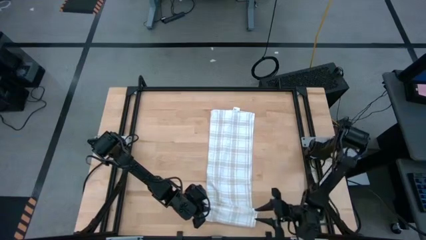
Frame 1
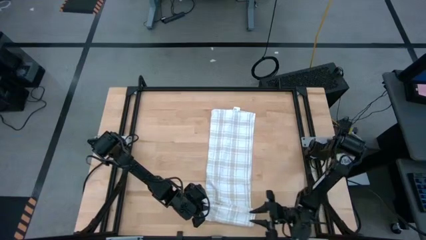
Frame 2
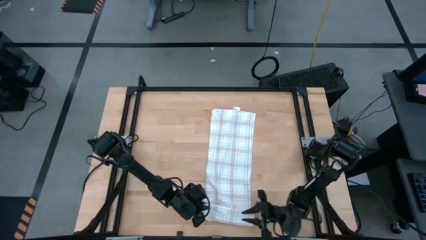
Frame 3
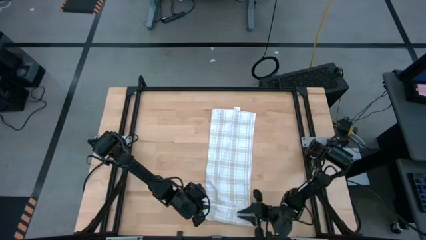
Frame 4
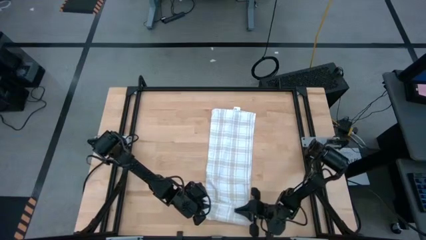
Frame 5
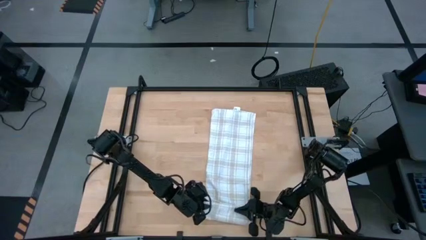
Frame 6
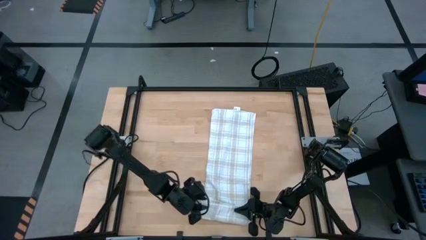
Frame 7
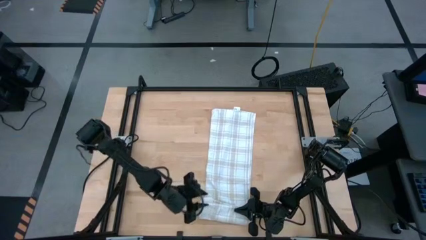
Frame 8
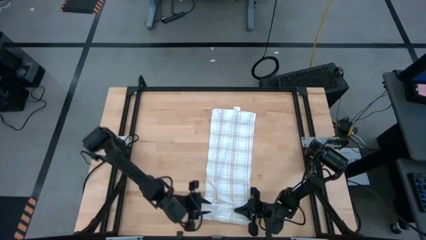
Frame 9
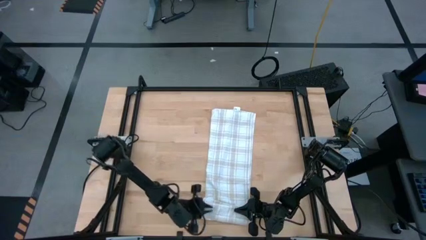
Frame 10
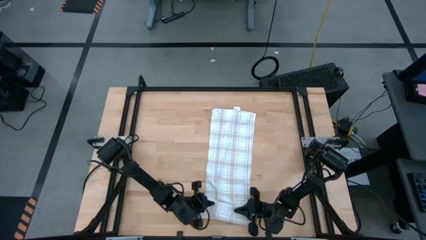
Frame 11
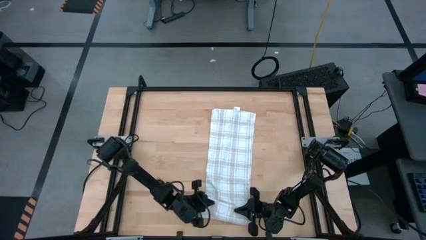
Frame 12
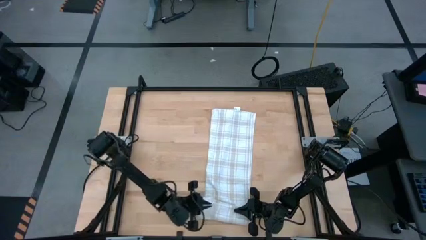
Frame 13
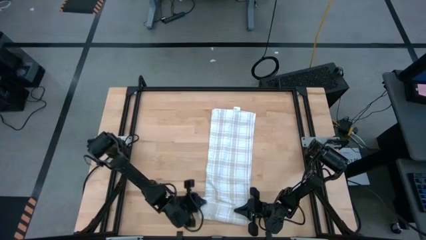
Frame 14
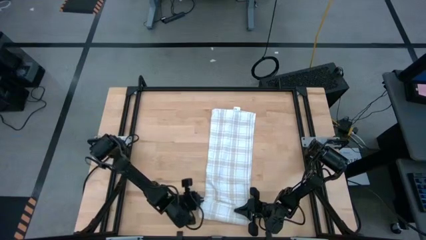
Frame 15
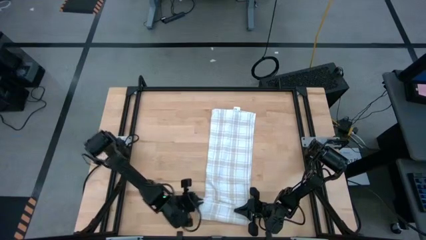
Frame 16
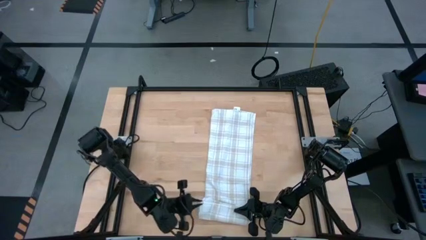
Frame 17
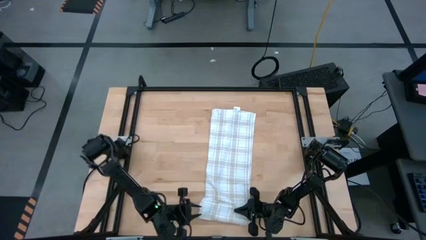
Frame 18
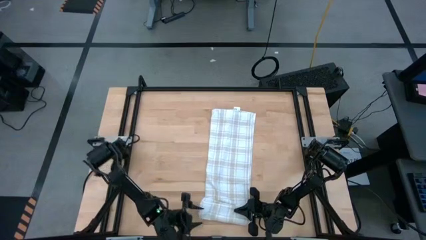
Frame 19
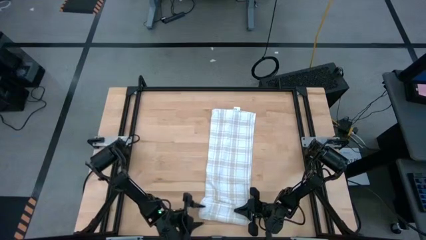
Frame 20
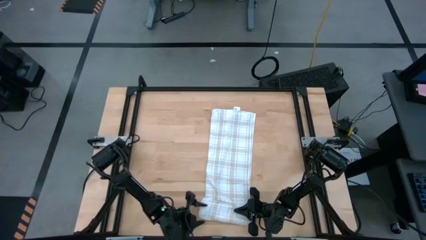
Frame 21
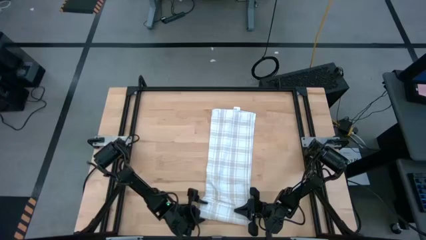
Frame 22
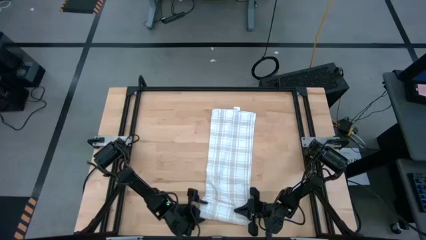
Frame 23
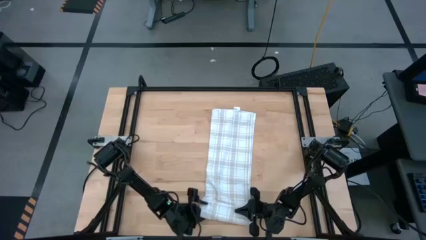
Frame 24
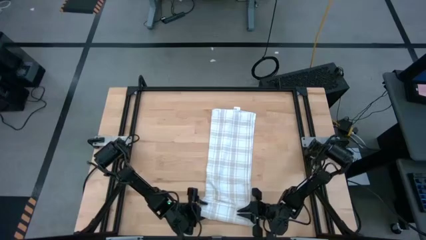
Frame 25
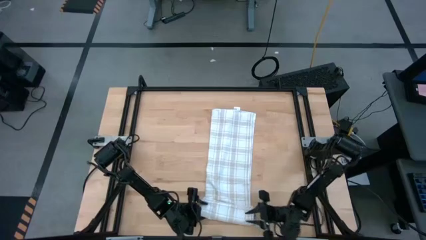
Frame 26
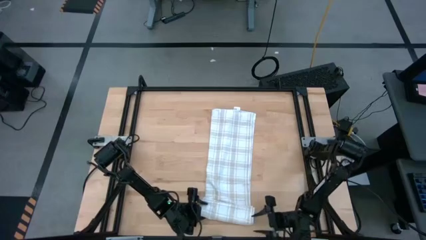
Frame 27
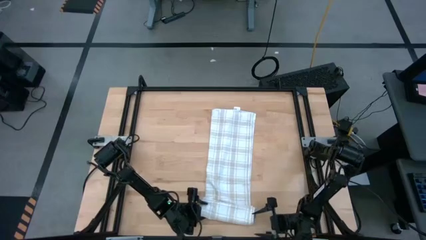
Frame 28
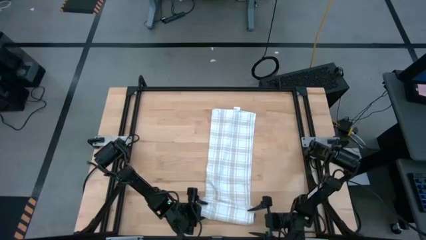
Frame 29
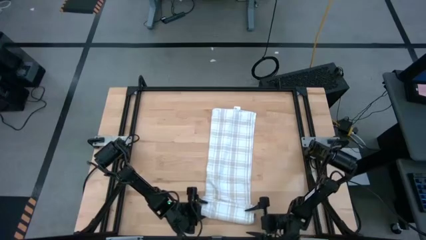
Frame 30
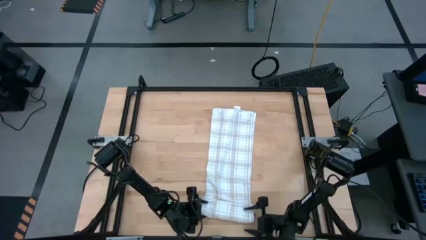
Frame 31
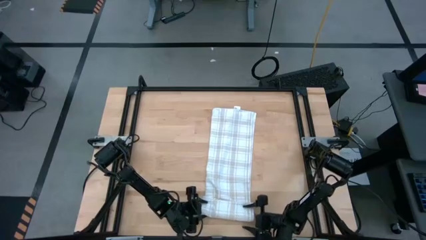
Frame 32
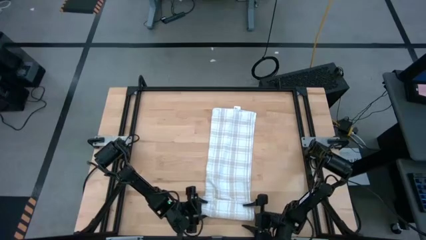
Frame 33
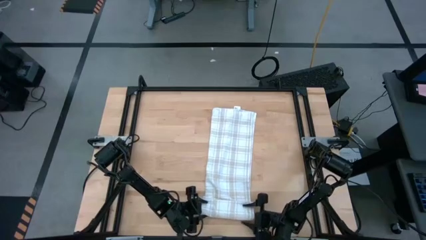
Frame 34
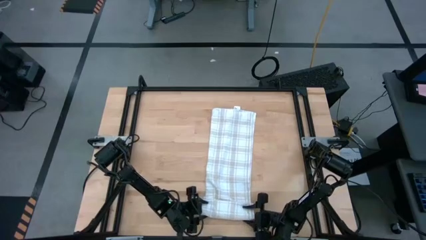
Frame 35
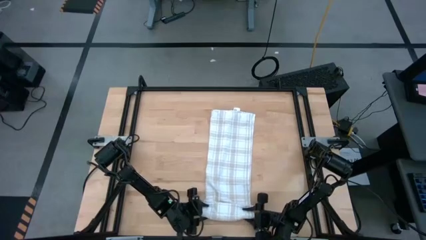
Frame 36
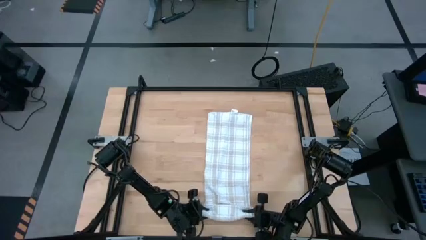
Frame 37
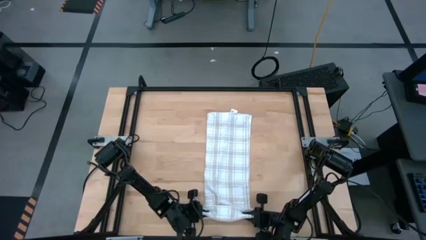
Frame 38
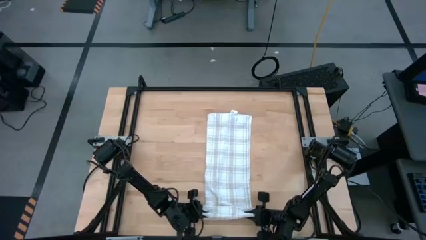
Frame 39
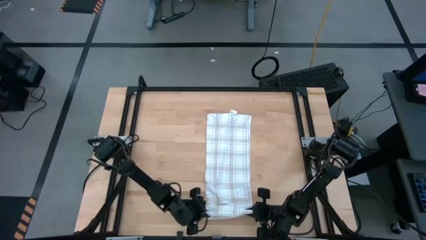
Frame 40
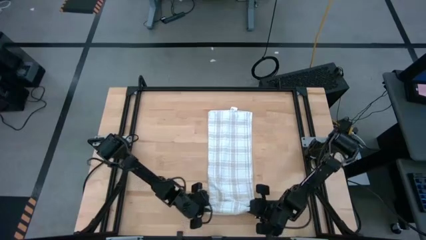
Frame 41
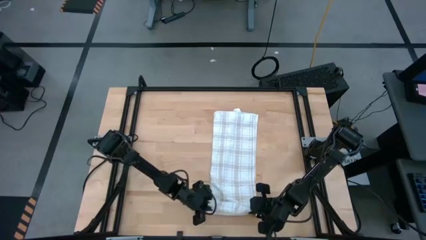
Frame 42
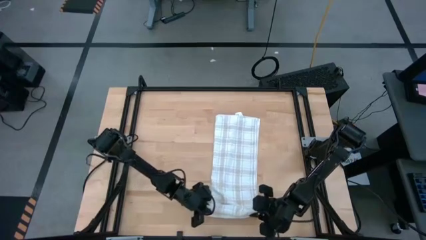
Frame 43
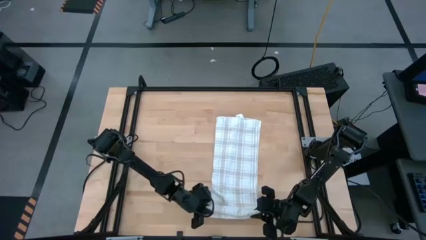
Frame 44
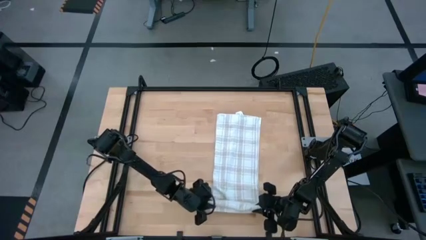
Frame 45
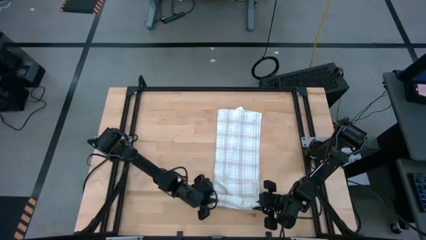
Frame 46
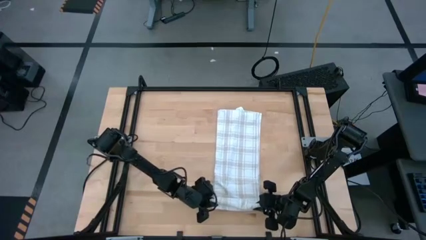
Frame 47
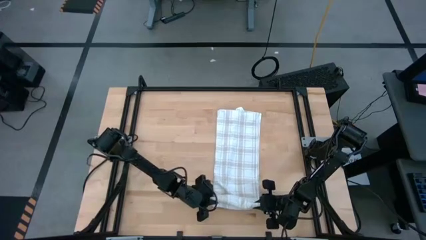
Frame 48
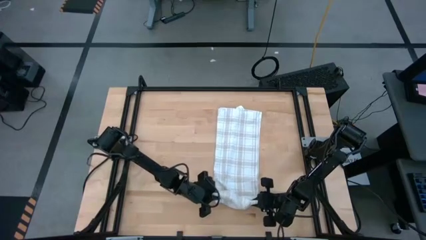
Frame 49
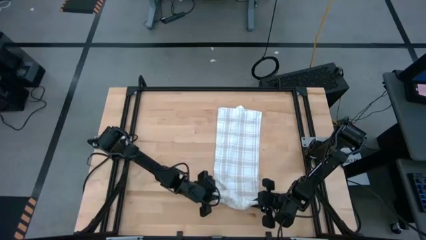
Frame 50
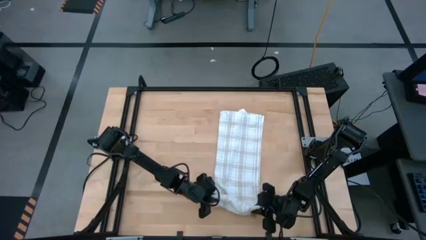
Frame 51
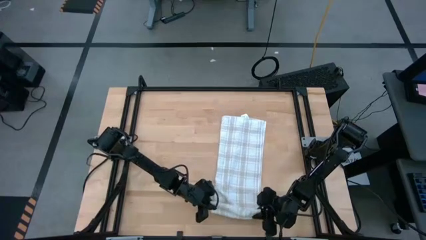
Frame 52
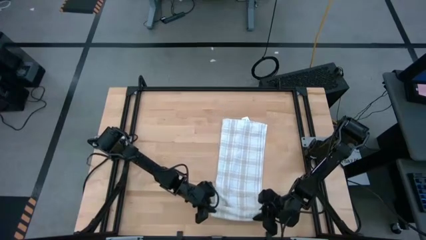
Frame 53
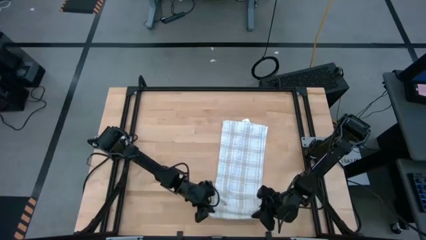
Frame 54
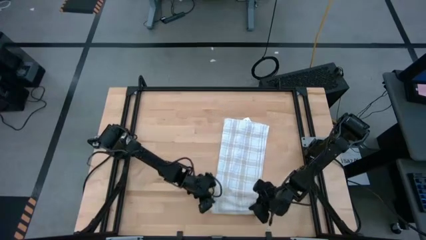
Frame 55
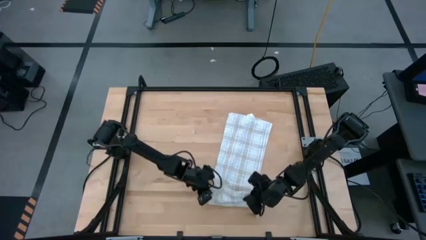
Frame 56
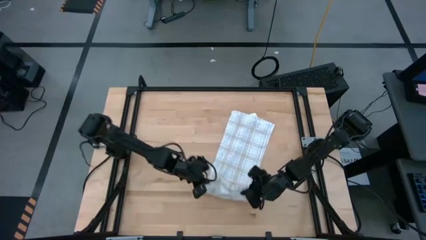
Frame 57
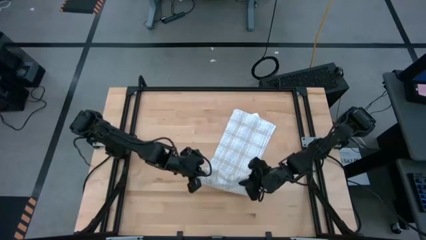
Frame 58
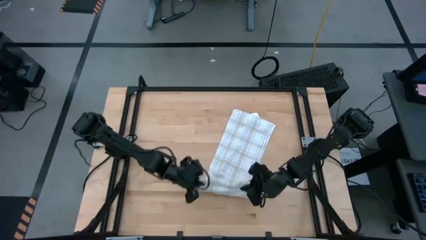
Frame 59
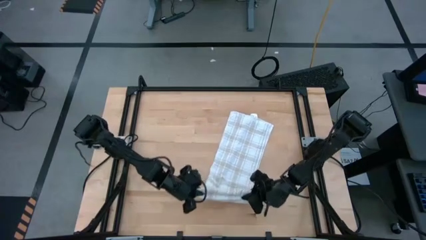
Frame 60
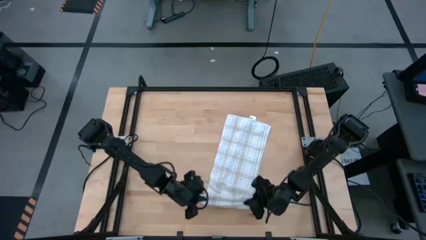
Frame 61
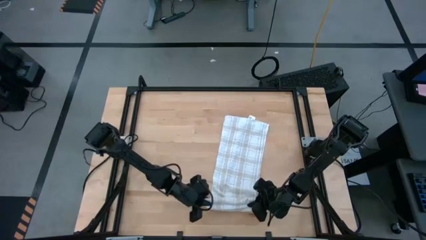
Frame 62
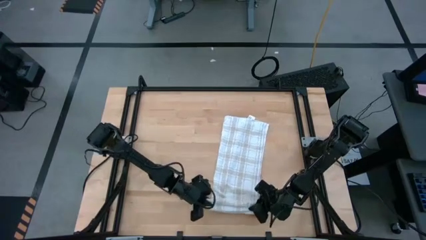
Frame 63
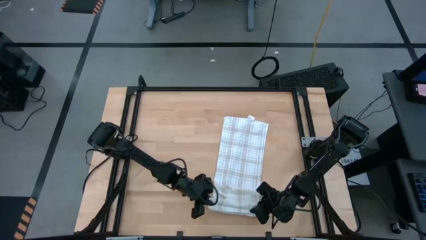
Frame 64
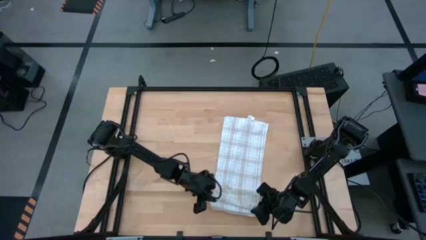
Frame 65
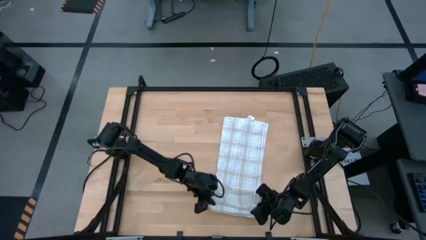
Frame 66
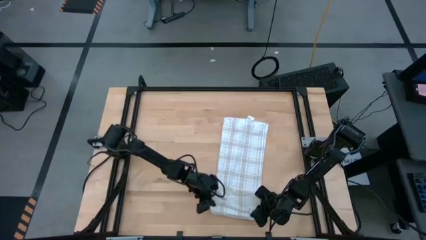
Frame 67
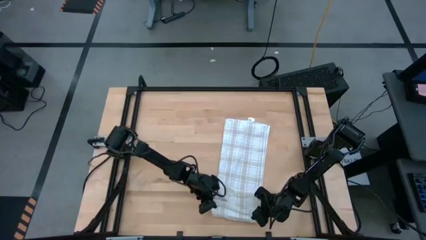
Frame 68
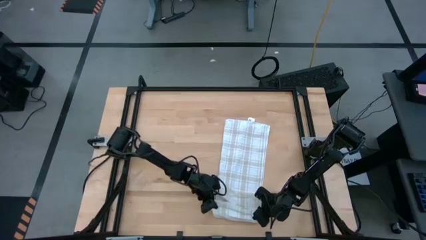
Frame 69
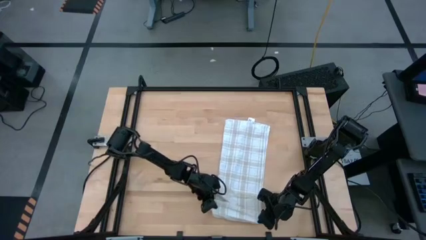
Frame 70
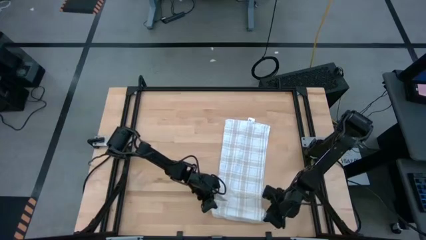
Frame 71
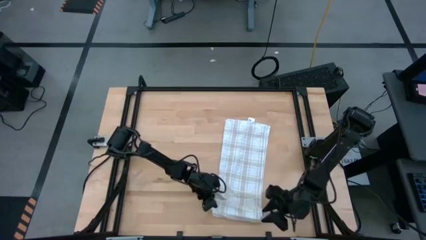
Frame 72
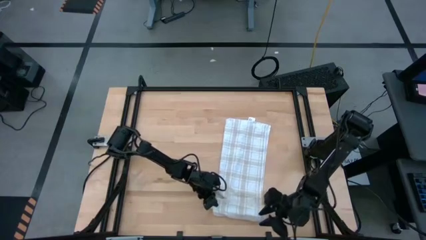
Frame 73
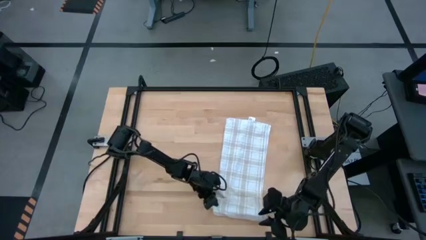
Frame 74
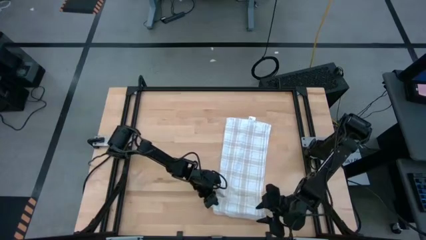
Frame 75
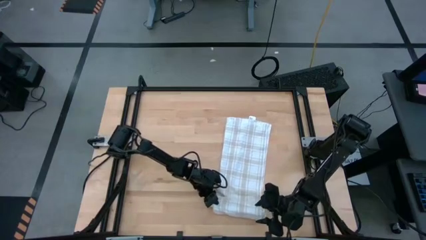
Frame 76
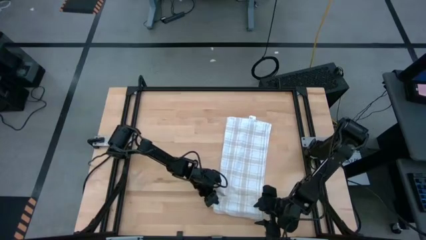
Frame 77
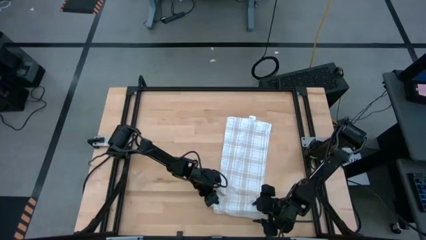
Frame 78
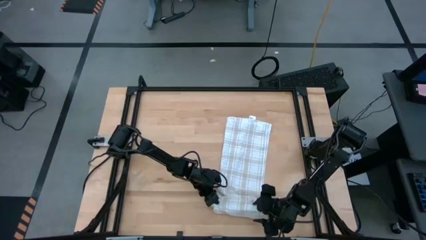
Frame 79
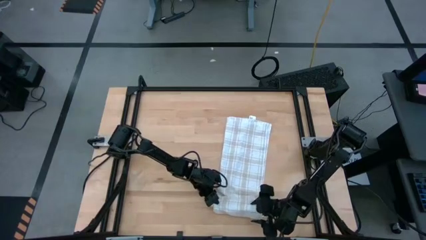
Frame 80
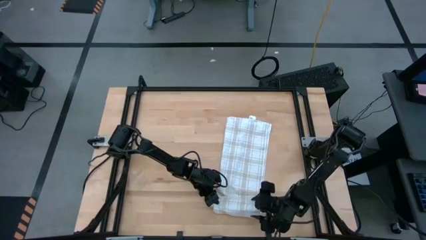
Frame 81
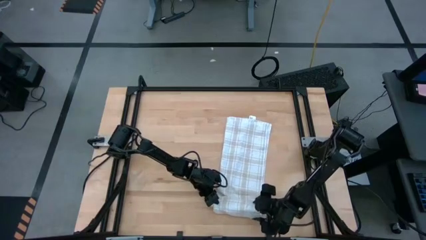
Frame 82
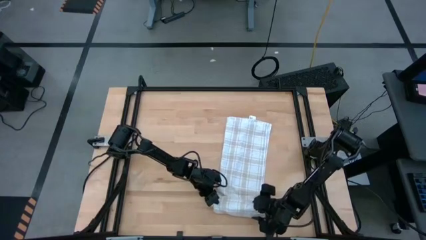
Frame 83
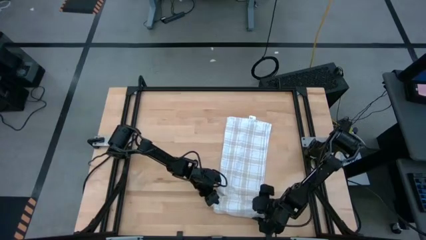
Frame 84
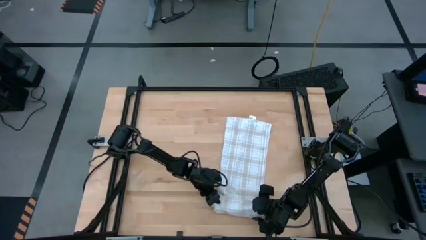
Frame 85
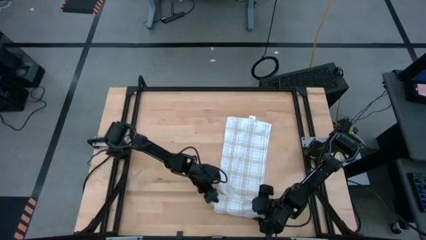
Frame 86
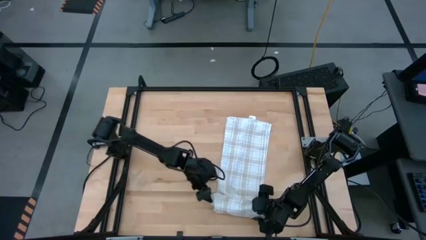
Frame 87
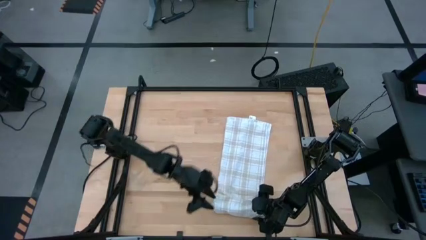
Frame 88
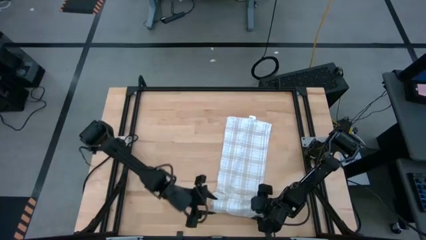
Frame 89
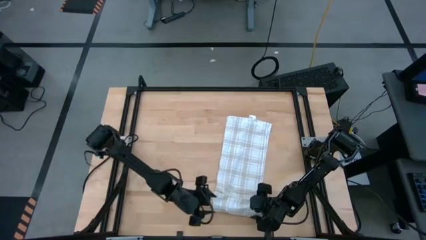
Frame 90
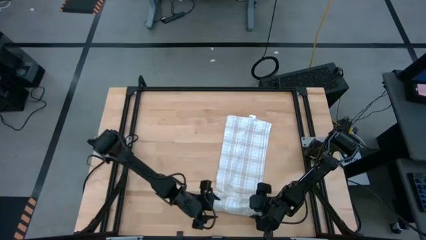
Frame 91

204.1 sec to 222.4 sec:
Task: Roll towel into tight, uniform cylinder
Roll the white towel
